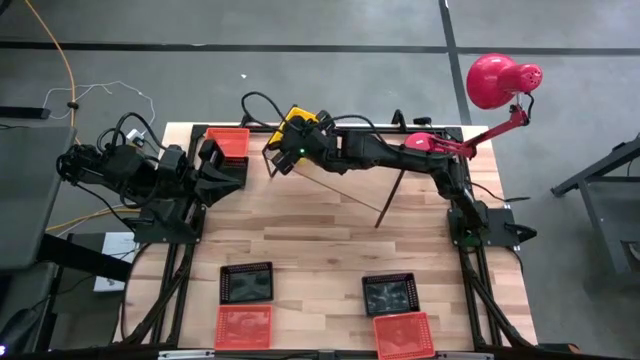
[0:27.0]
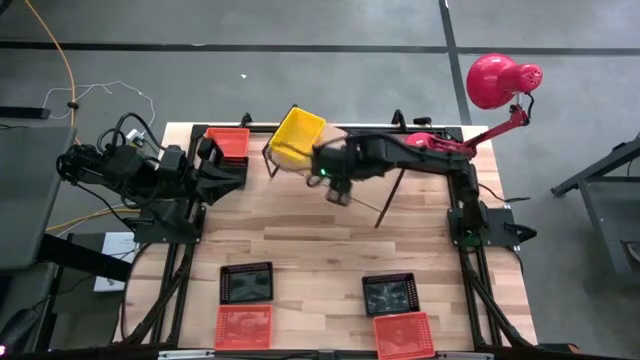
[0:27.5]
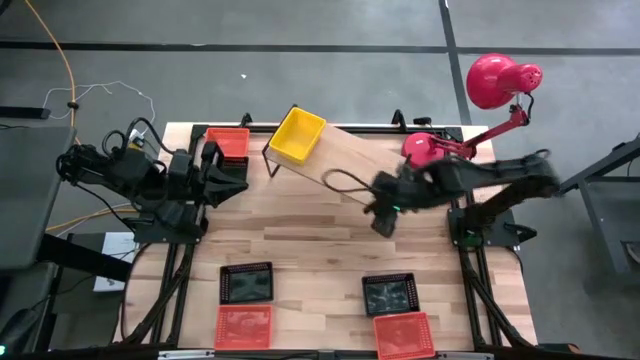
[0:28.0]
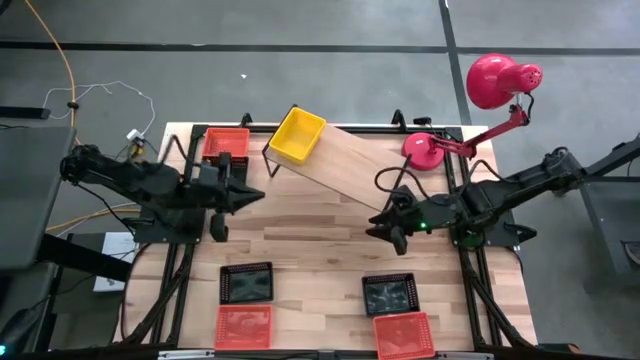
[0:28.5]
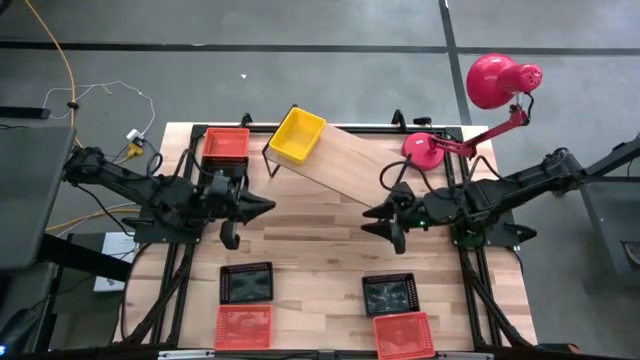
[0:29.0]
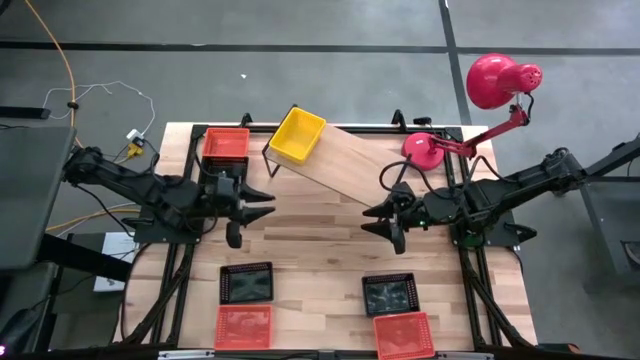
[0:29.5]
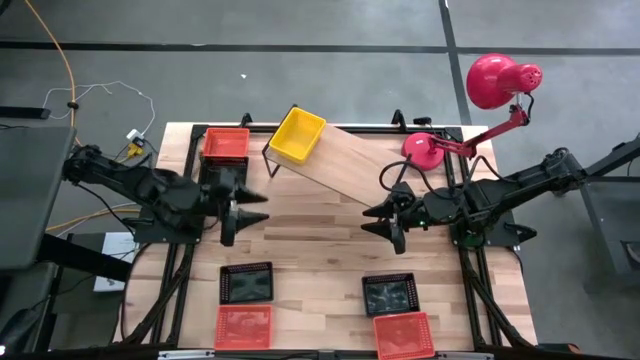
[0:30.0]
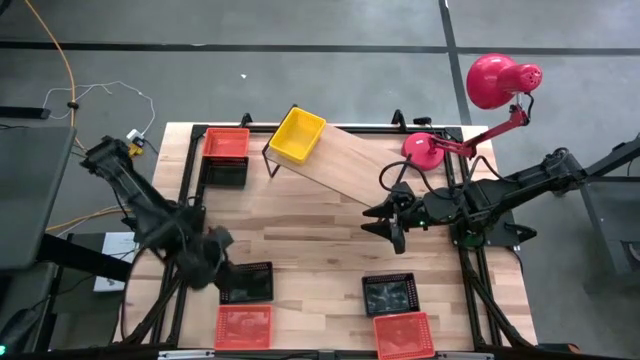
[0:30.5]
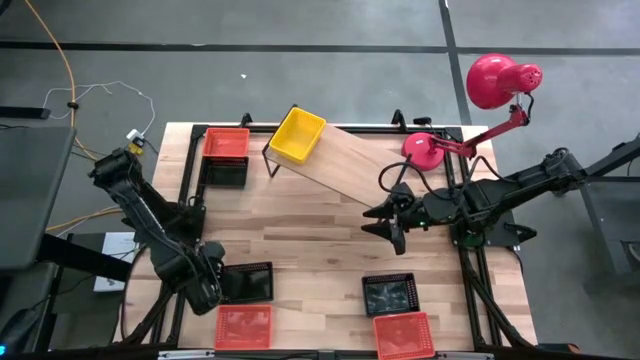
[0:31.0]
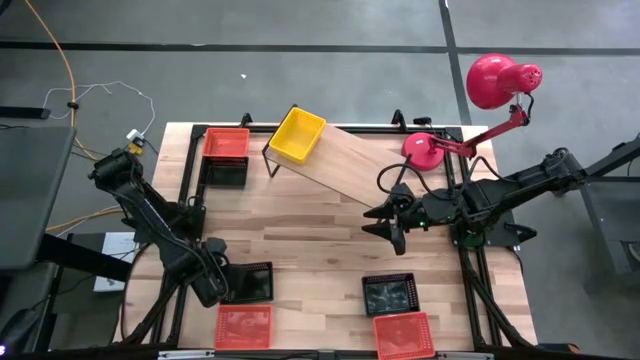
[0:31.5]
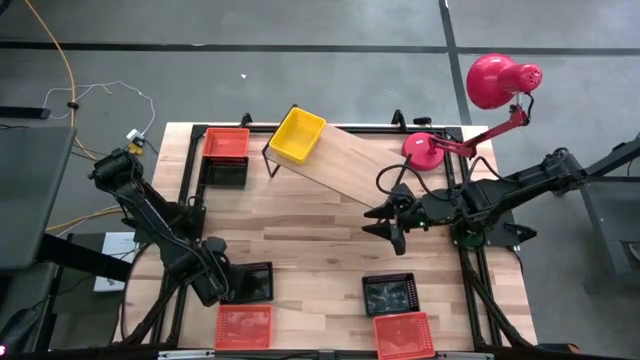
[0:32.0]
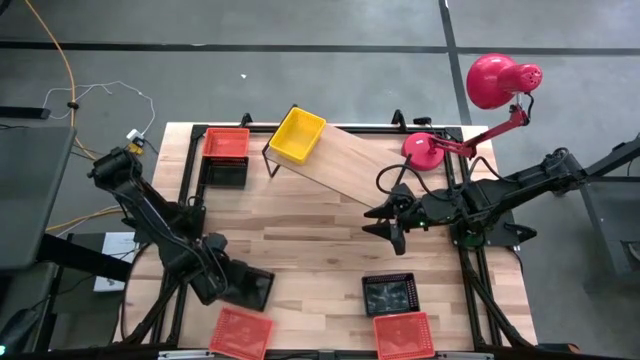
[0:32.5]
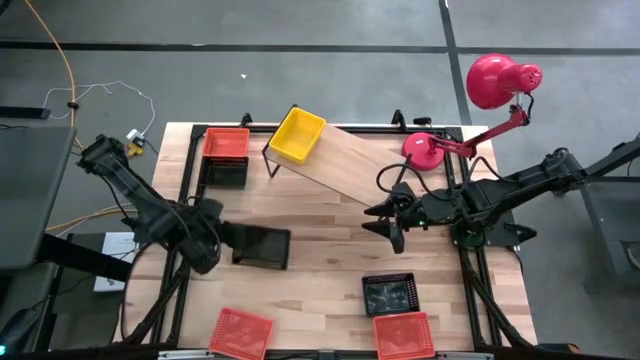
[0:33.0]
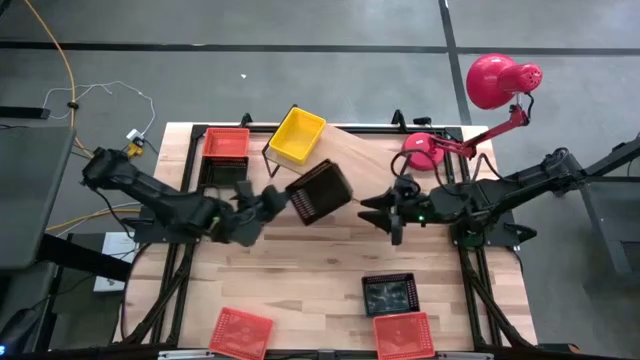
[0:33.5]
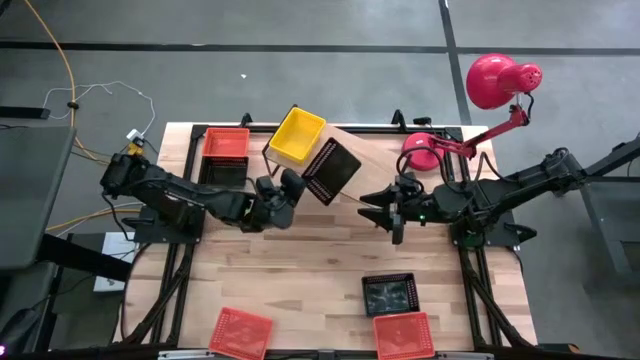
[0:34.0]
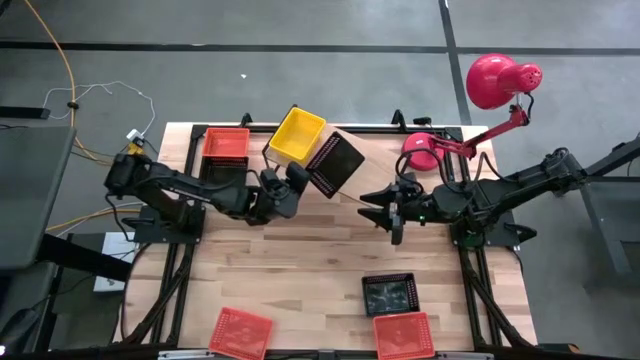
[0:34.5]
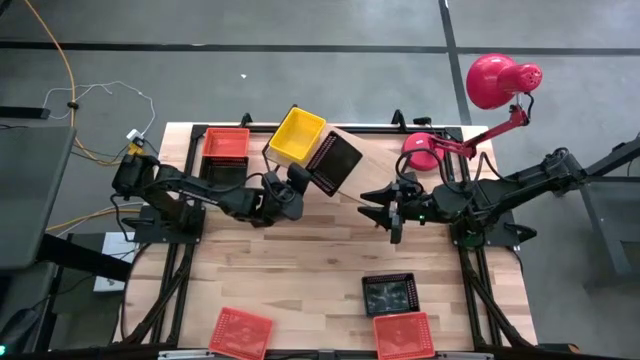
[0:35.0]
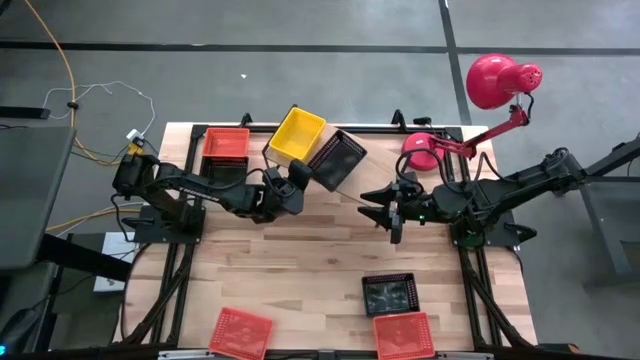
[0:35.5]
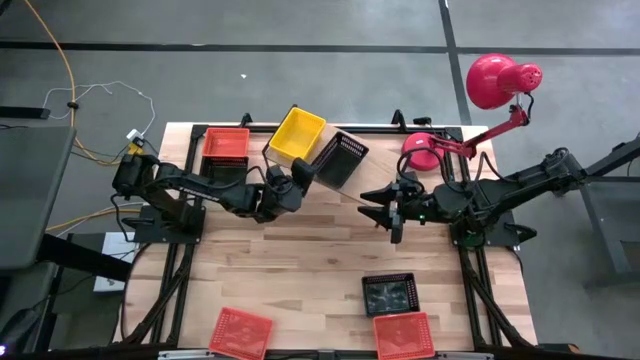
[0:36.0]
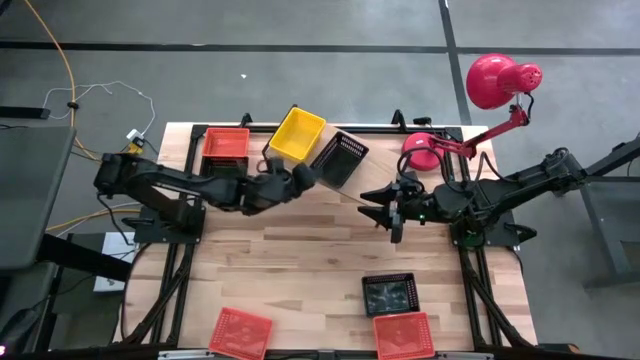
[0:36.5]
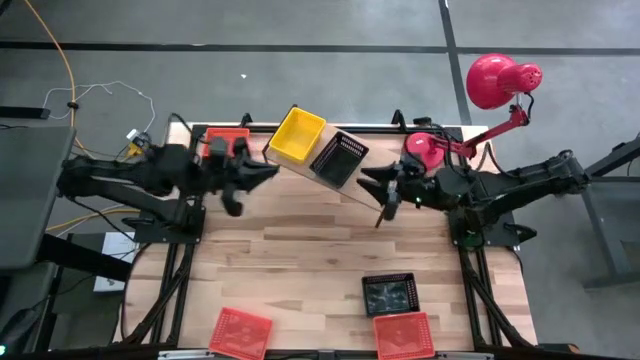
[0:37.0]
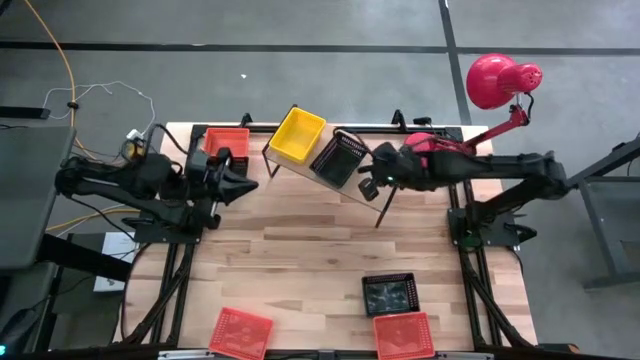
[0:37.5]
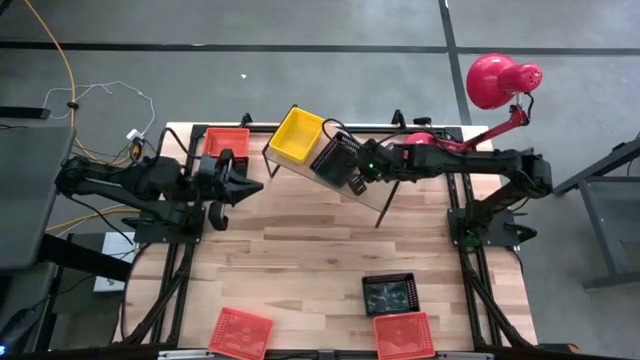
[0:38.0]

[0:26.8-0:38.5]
Task: Stack baskets on shelf by color
Put the bottom left black bin on the shelf

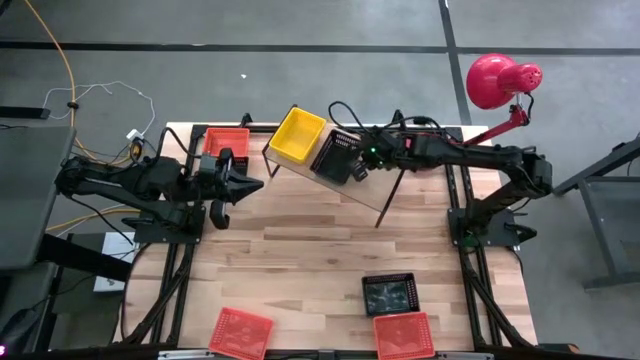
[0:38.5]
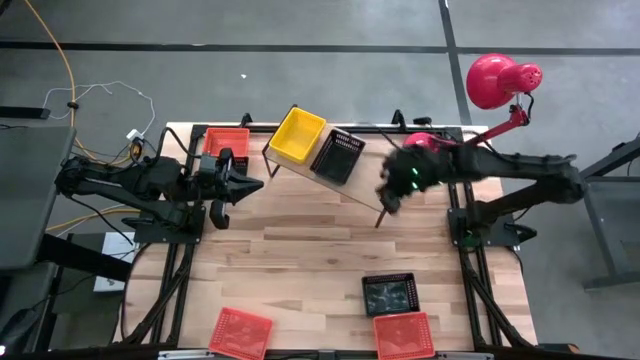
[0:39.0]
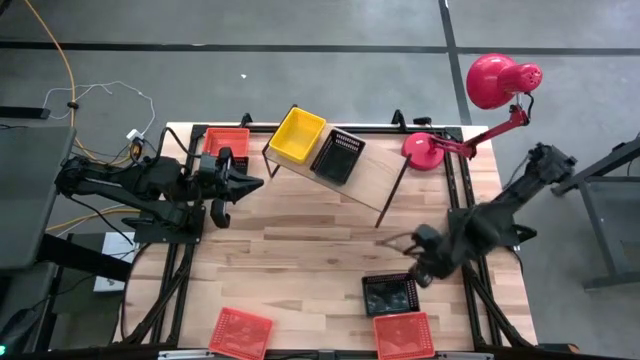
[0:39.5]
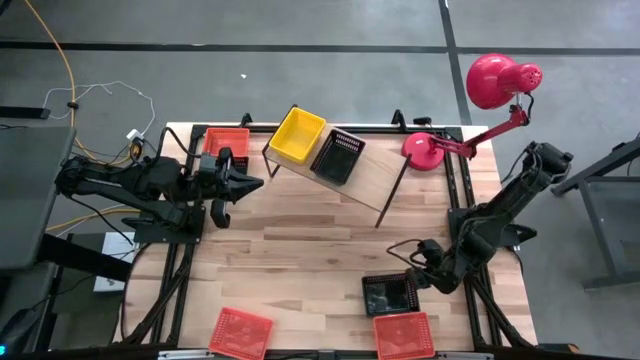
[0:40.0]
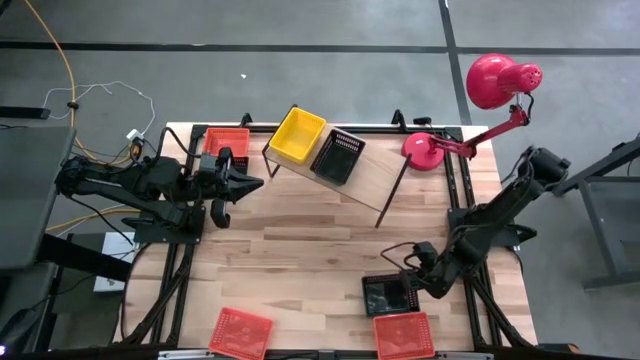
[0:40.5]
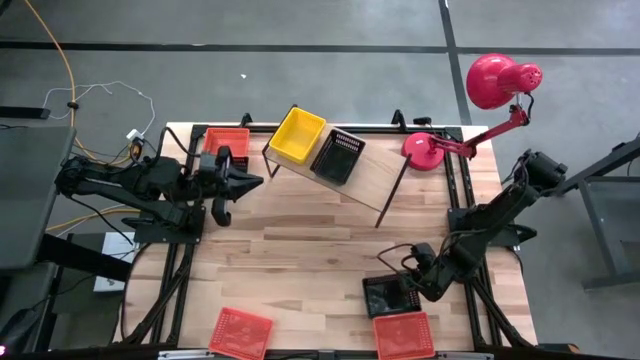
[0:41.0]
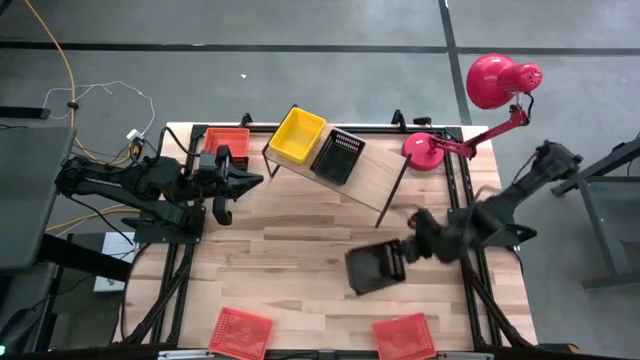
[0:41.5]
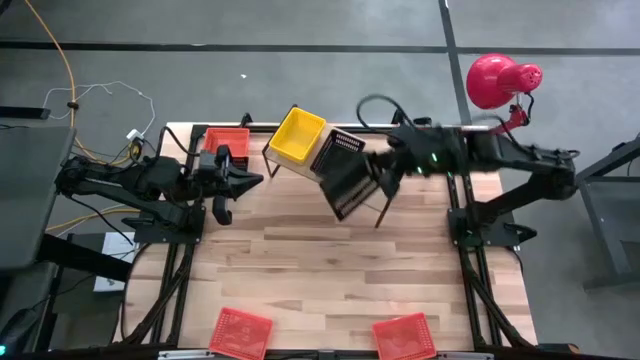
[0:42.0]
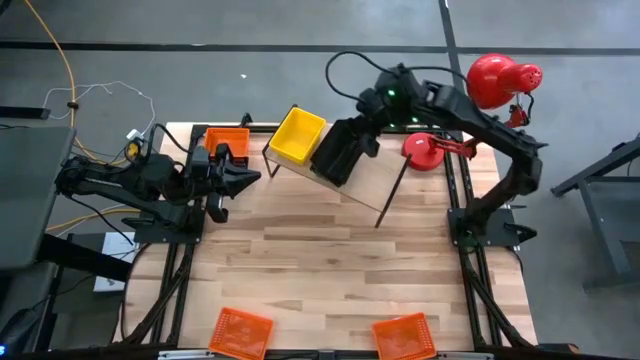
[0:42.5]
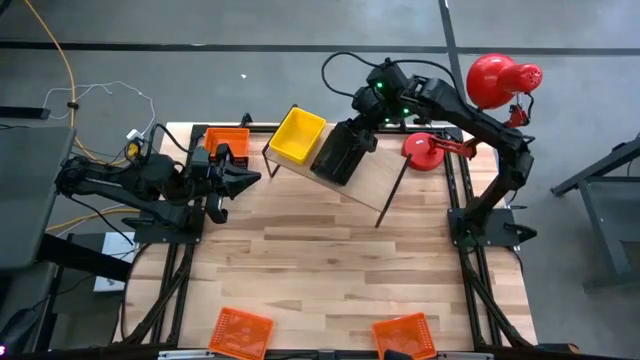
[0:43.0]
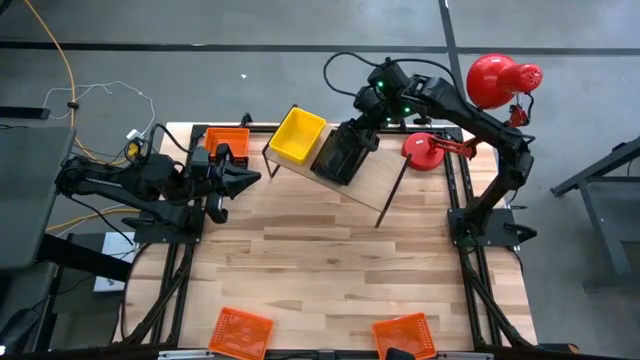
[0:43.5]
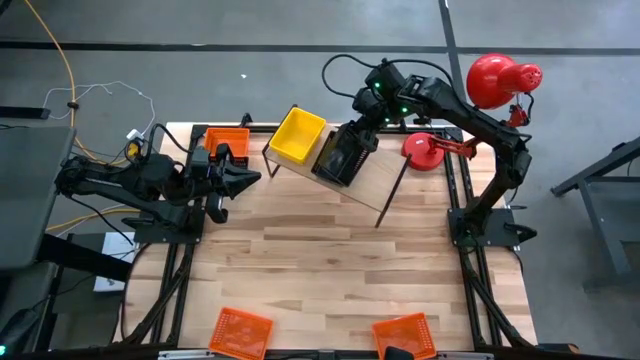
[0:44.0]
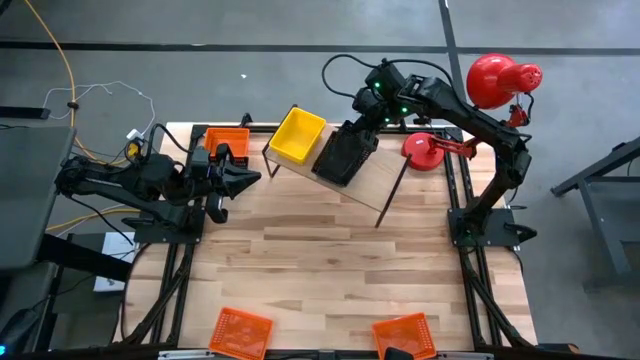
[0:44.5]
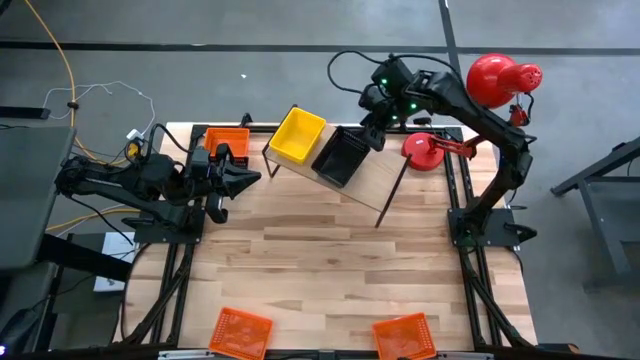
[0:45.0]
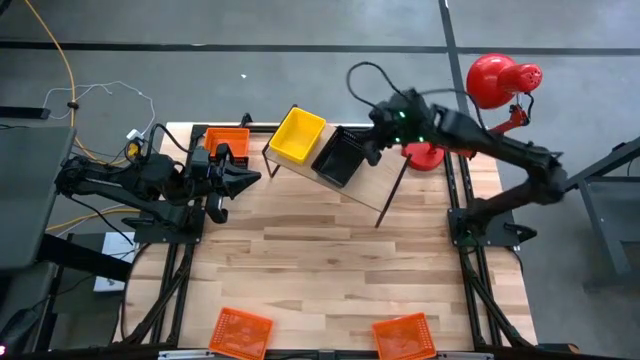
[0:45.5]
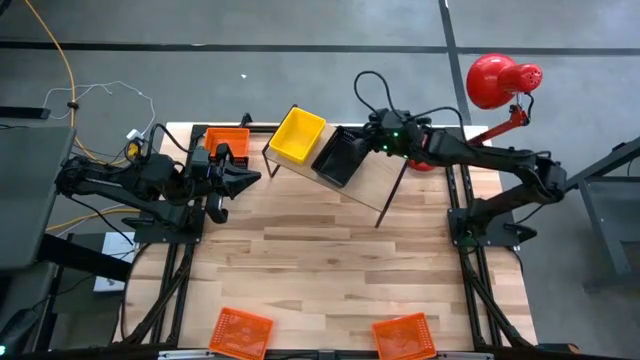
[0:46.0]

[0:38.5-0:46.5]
Stack the bottom black bin on top of the black bin on the shelf

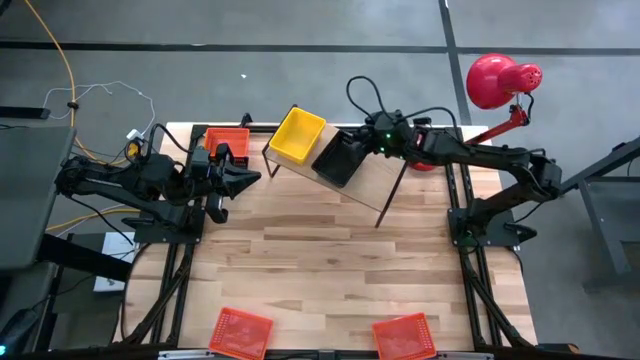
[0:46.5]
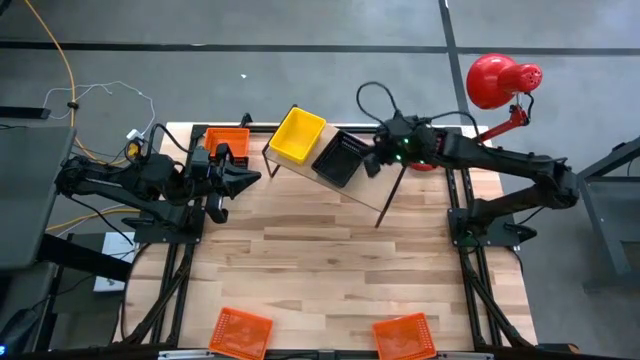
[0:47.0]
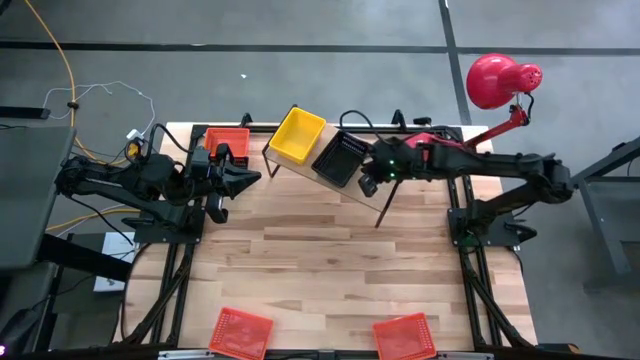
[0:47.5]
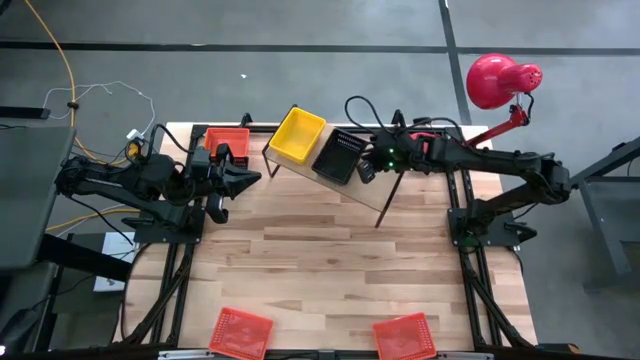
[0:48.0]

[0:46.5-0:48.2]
Adjust the stacked black bin on the shelf

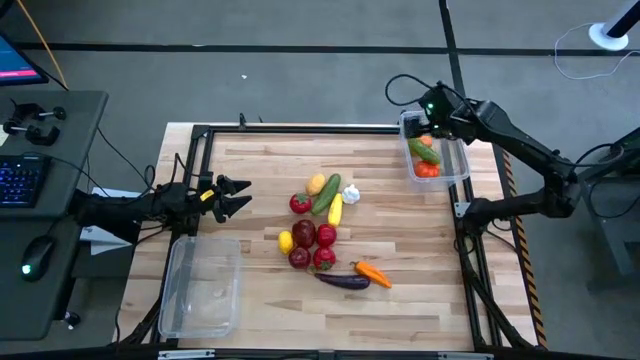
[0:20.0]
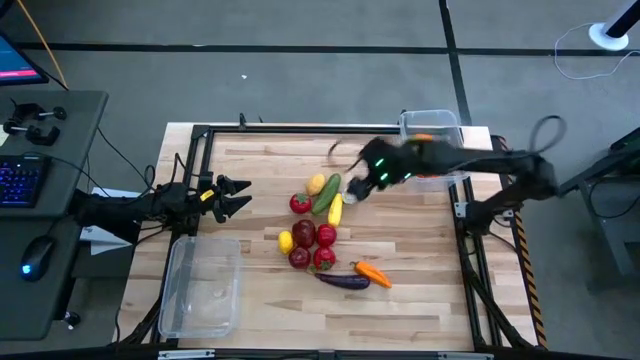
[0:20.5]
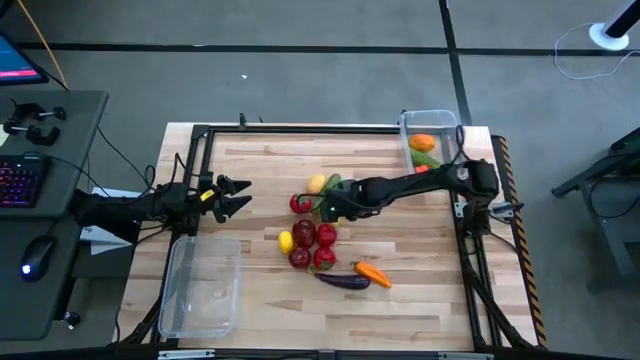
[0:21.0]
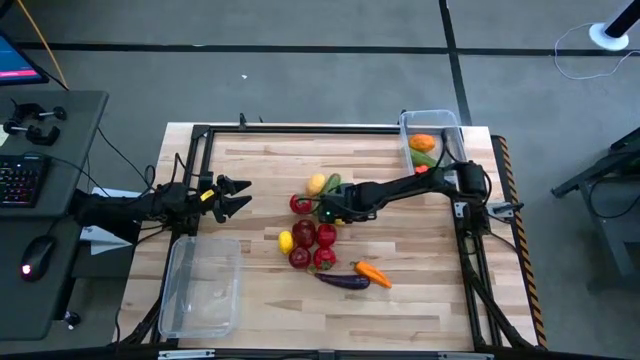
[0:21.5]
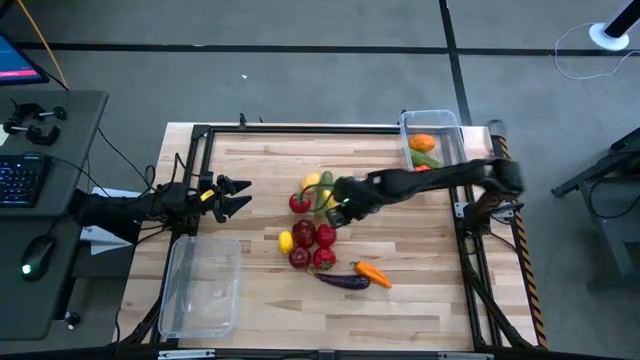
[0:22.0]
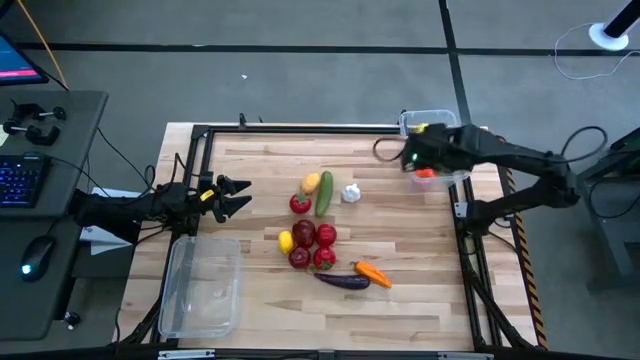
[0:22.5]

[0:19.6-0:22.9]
Task: Sort produce into baskets
Put the yellow corn into the top transparent bin
